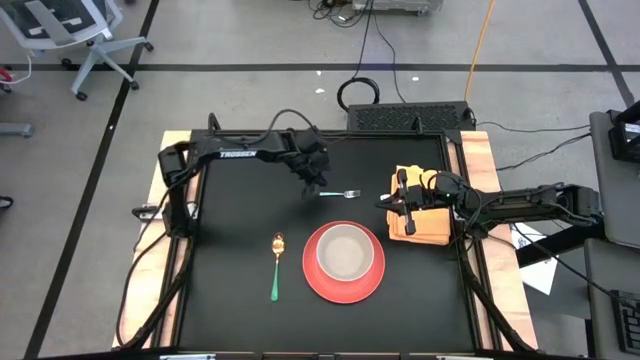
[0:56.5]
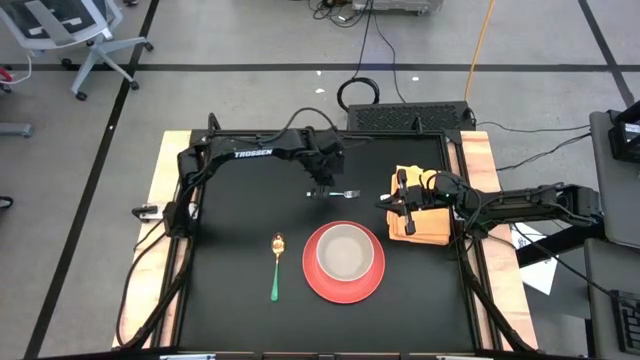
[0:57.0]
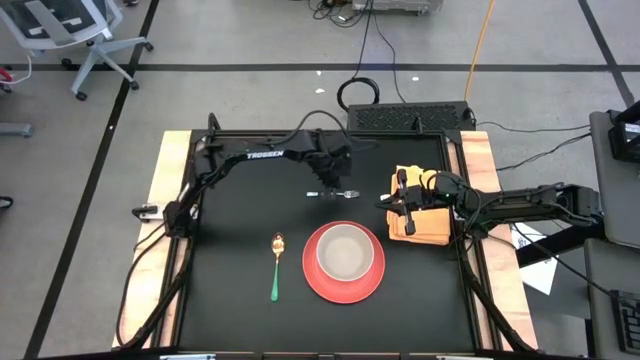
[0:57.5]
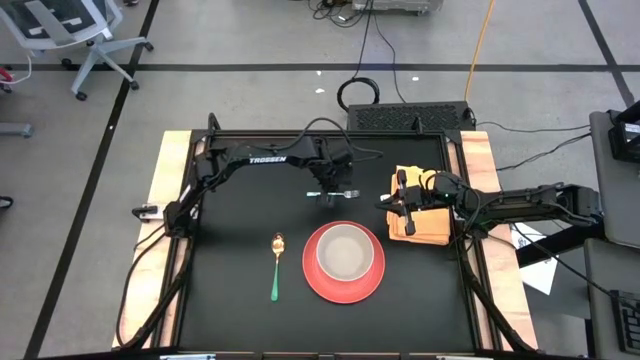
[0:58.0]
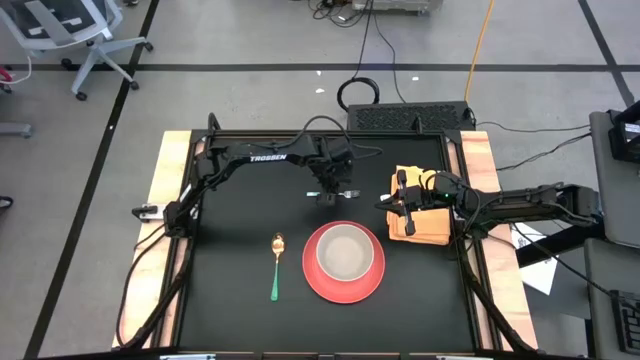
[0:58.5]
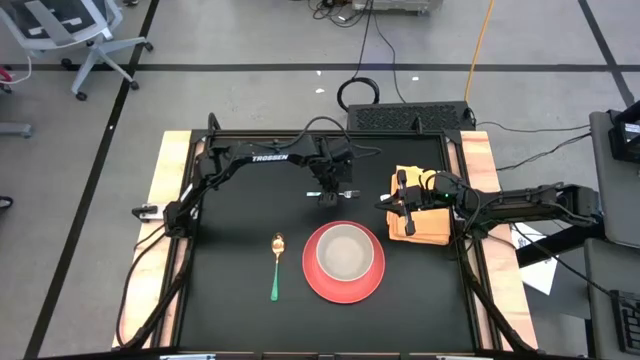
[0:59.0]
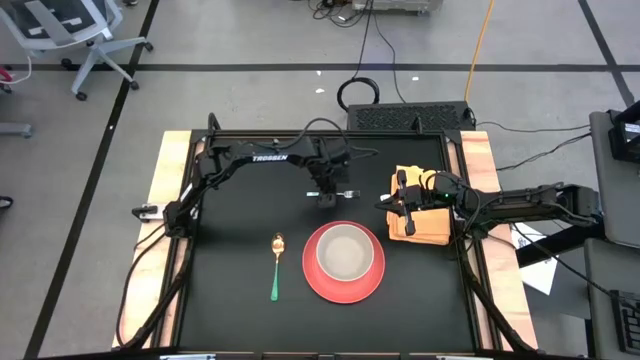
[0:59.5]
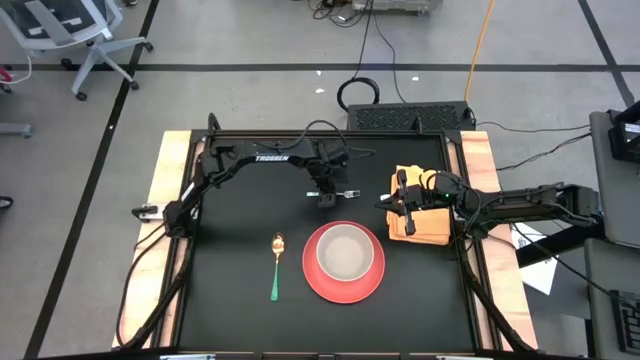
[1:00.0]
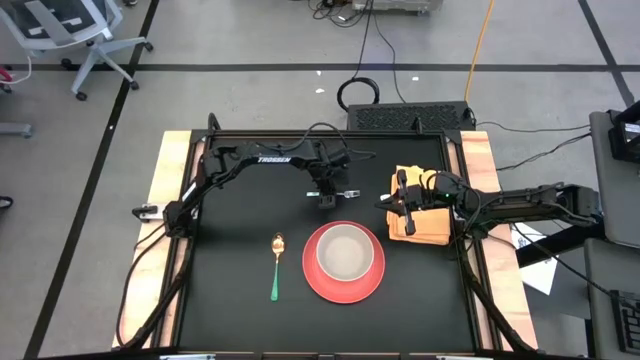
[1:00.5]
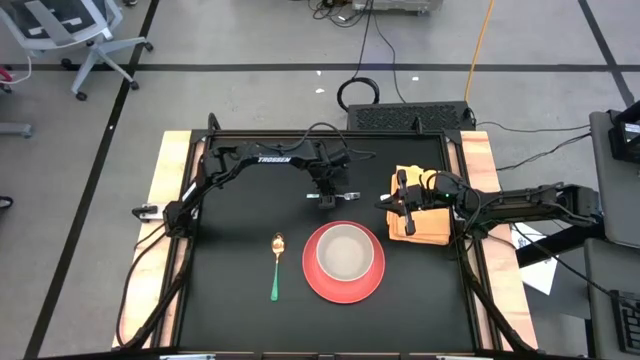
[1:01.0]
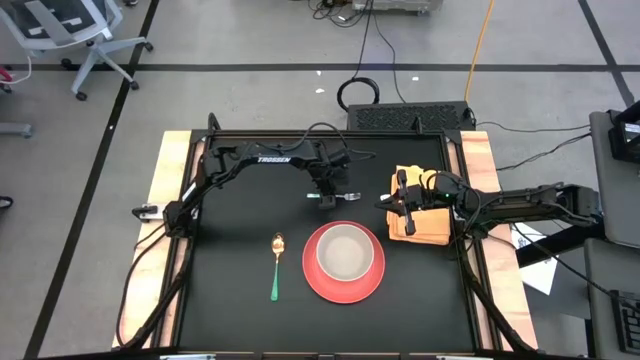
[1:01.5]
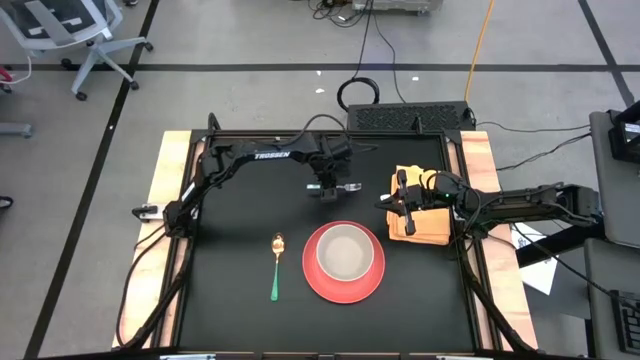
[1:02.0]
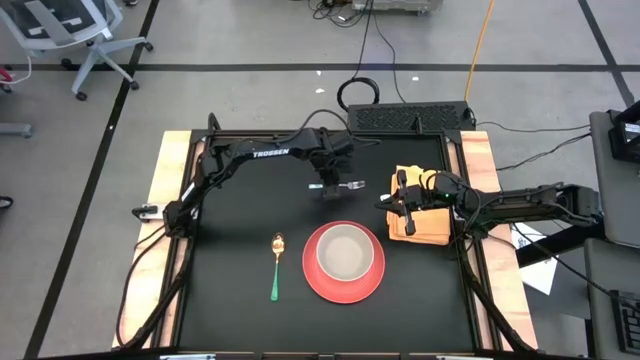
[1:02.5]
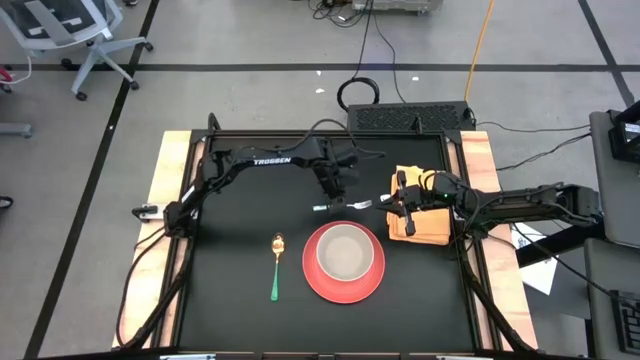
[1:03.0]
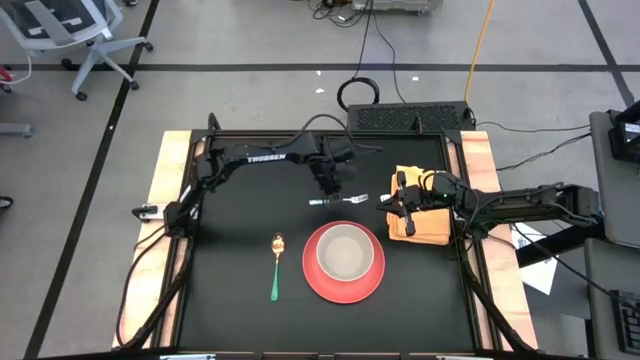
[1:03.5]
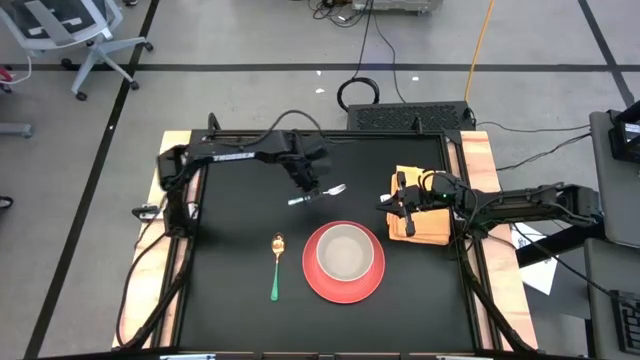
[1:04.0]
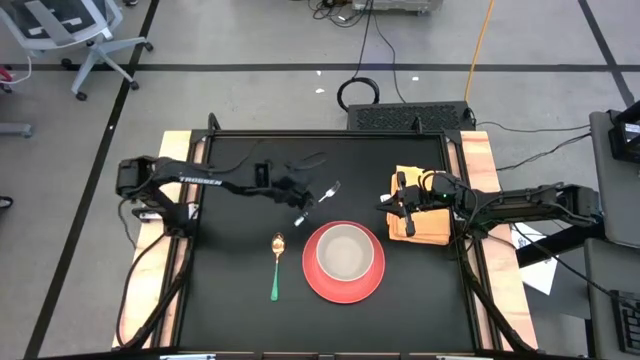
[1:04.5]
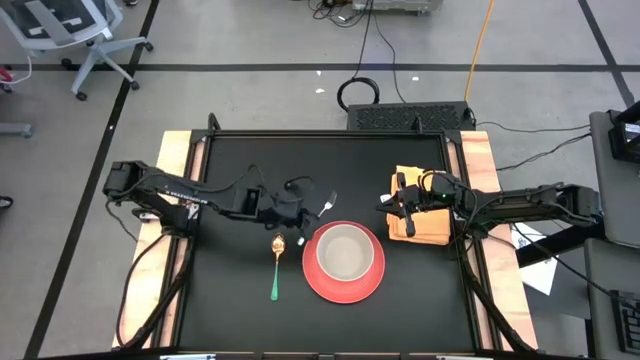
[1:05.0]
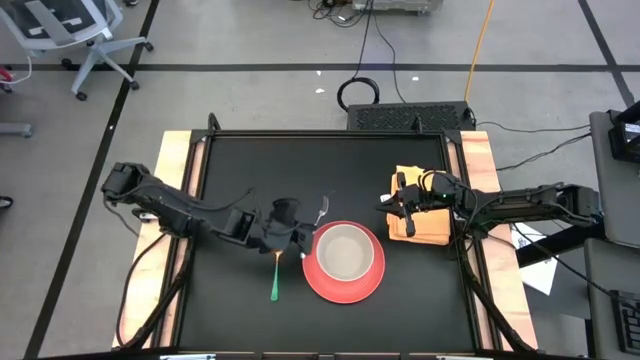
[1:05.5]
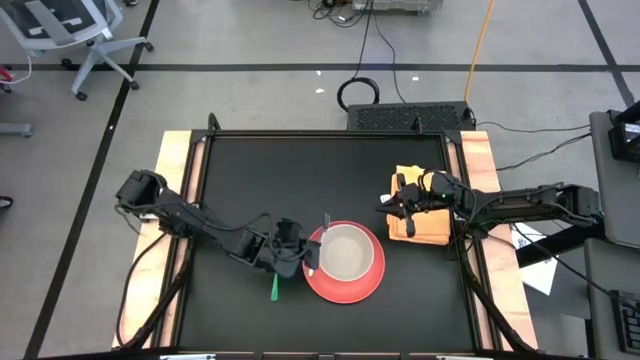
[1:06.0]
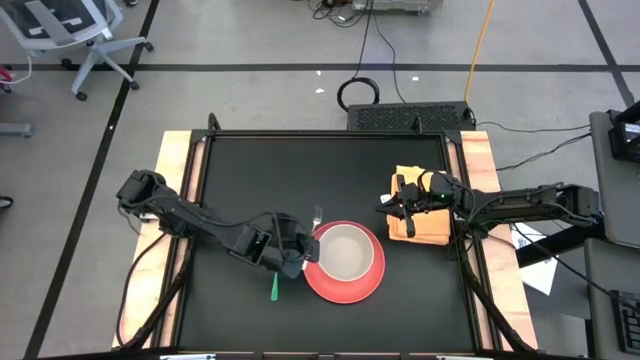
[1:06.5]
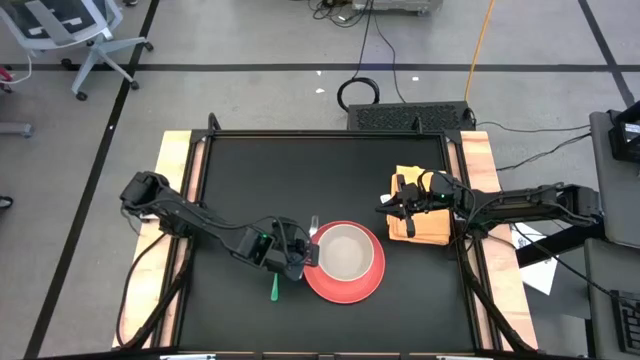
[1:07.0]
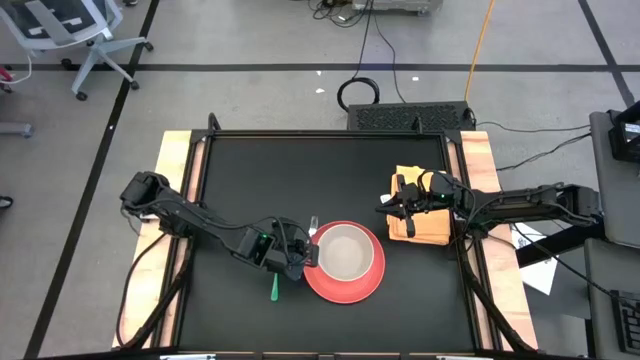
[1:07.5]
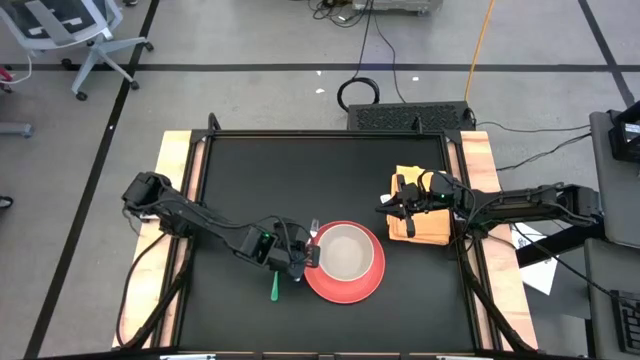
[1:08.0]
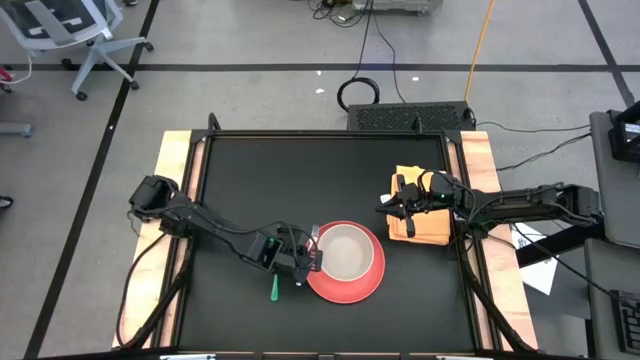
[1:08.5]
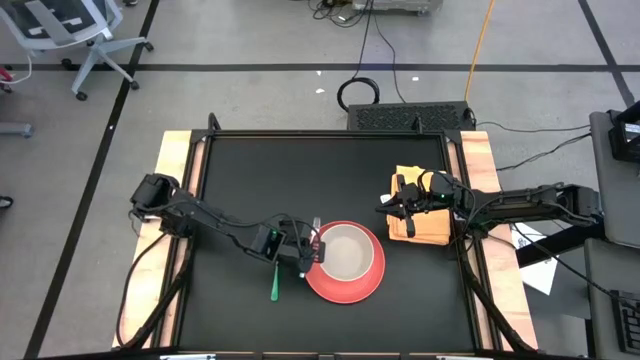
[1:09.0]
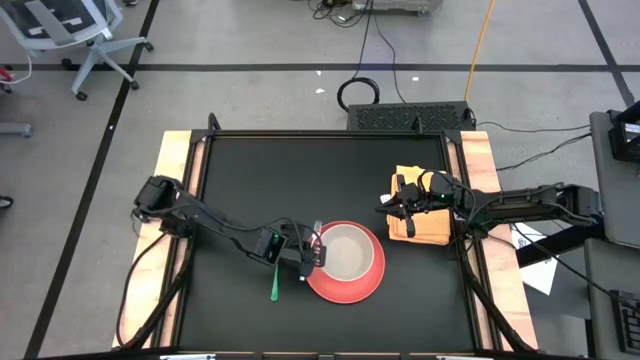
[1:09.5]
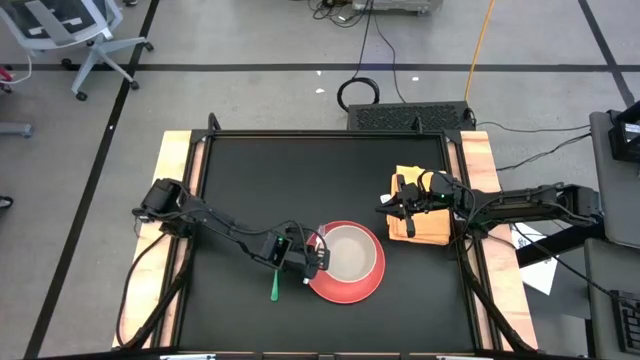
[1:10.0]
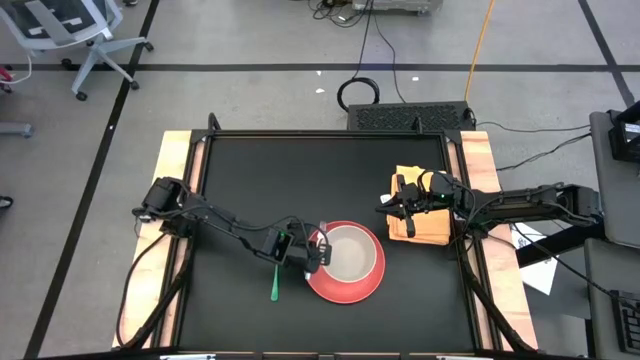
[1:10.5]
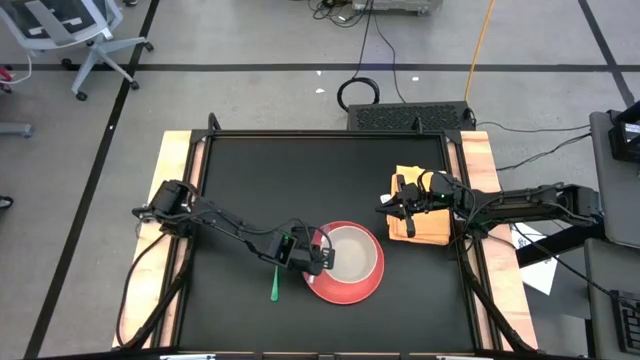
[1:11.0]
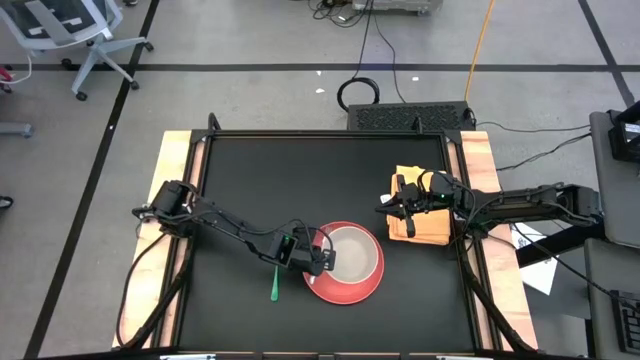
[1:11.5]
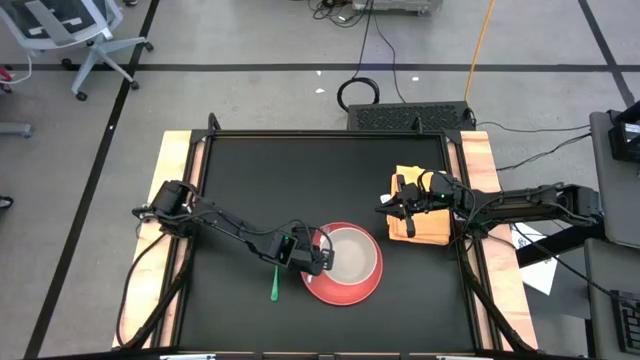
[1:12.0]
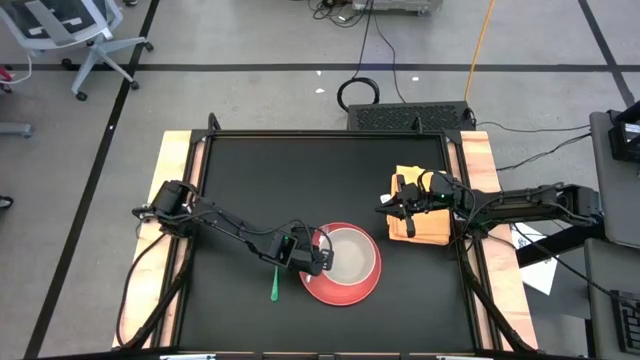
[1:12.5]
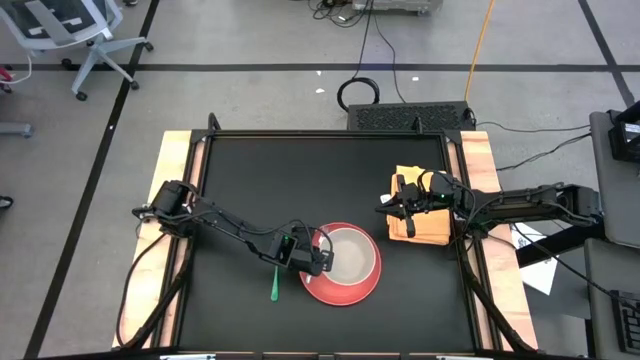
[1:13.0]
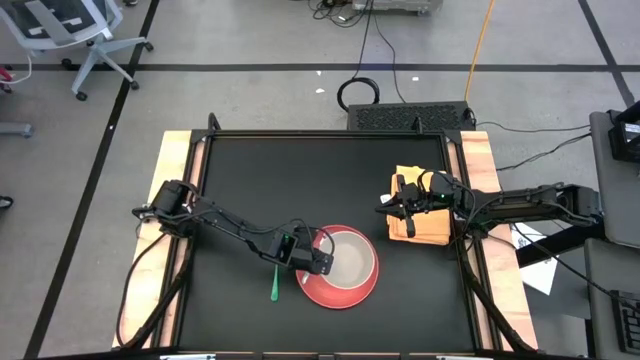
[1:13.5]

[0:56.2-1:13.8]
Task: Set table place
Put the green patterned fork on the orange plate to the left of the white bowl

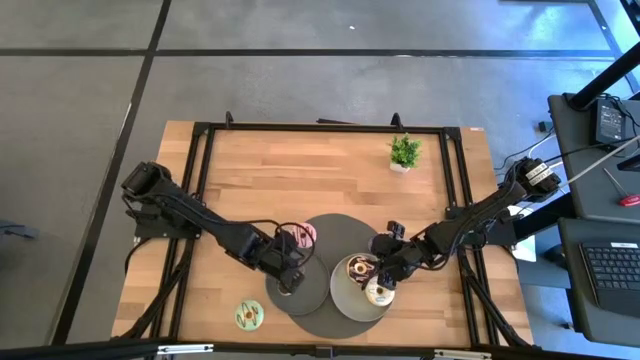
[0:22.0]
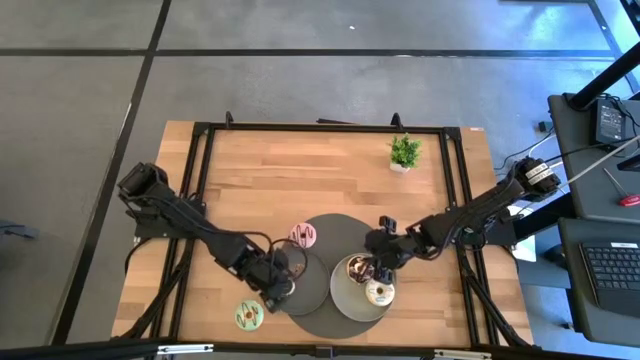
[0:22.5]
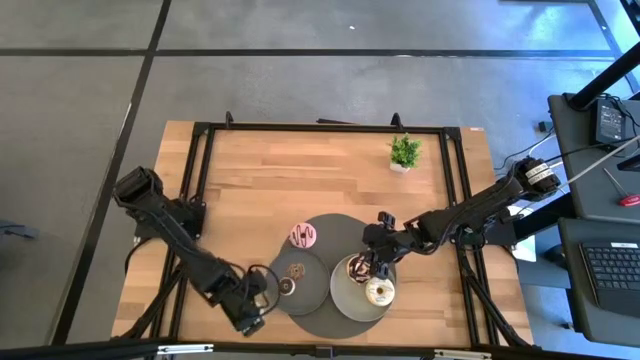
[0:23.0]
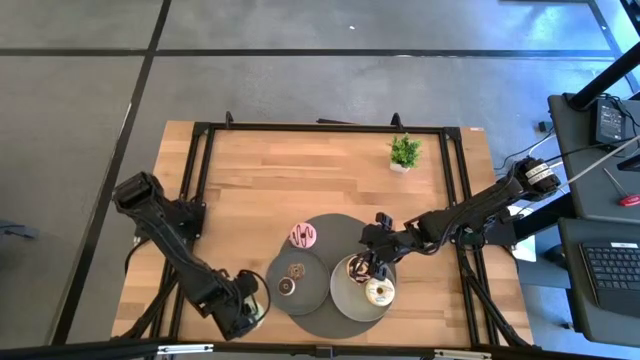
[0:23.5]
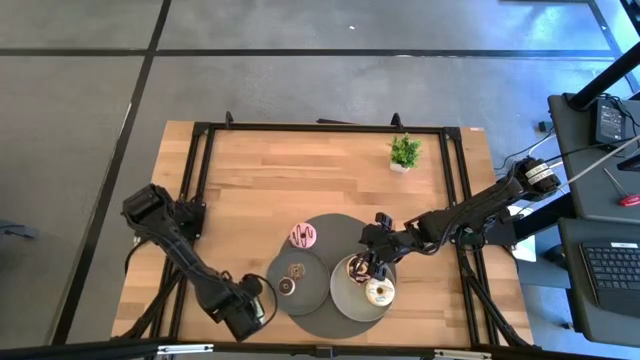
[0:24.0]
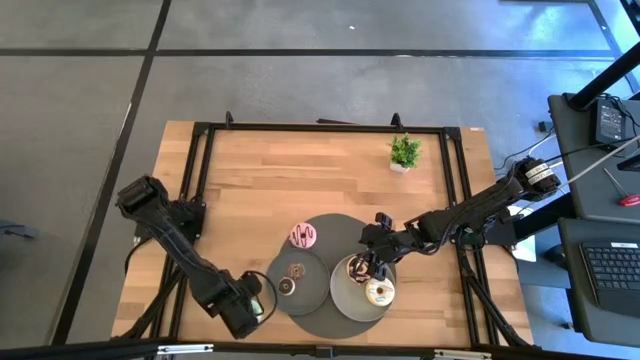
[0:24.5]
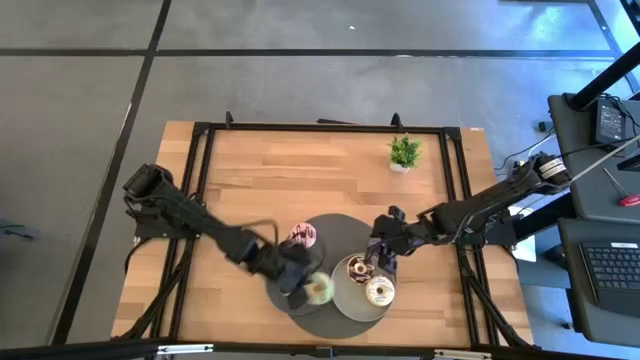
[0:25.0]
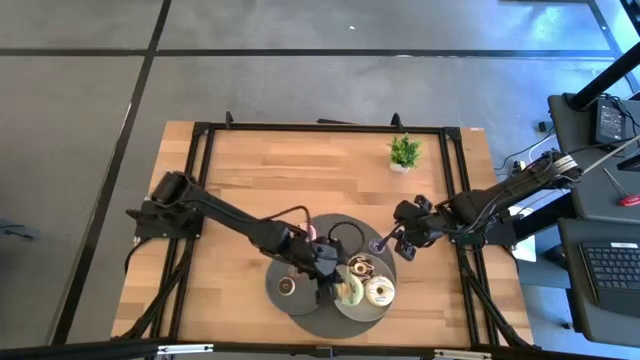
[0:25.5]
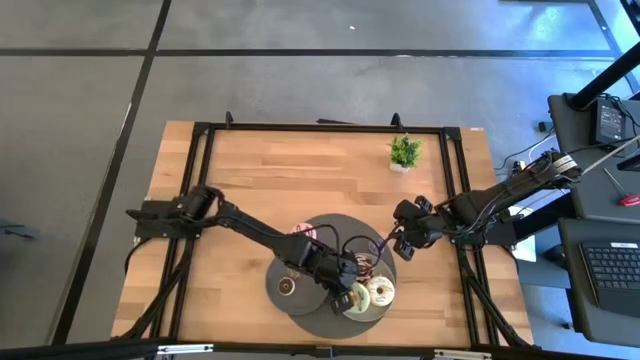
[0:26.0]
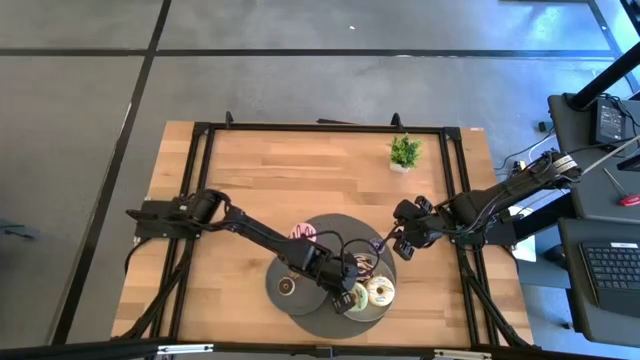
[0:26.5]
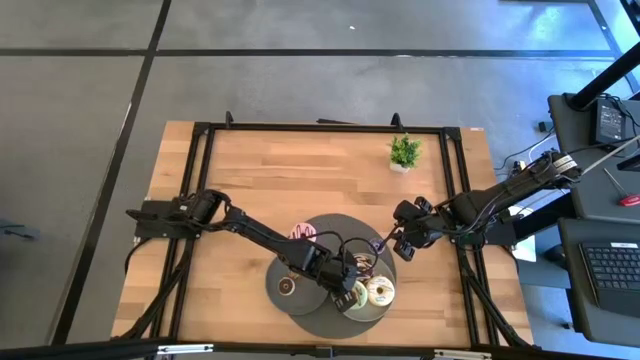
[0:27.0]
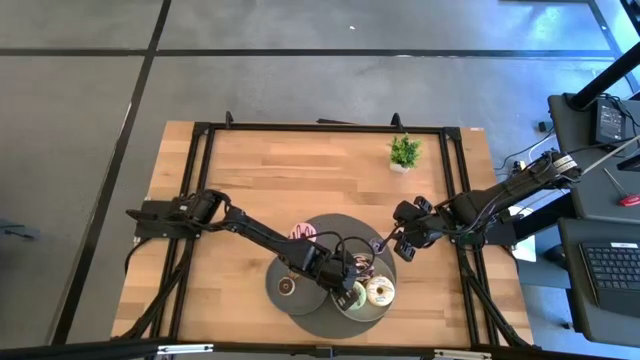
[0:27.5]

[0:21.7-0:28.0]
Task: Pick & Place donuts
Put the large blue donut on the gray plate
